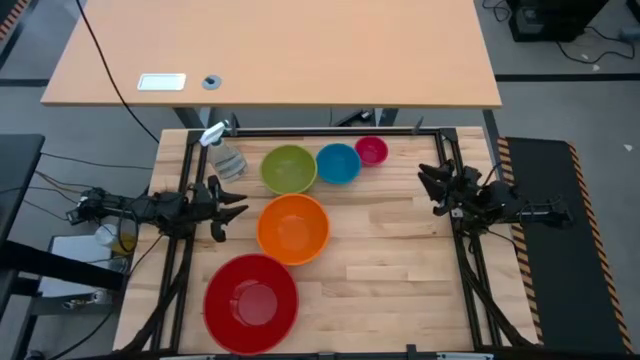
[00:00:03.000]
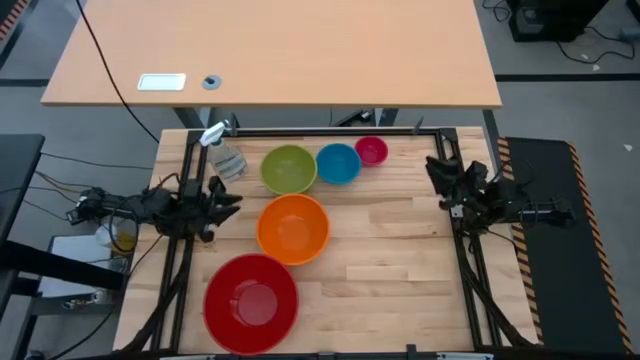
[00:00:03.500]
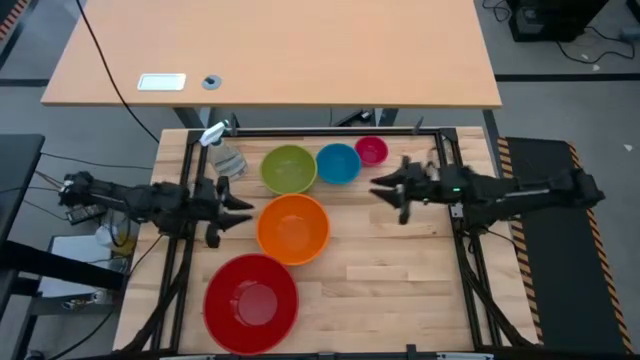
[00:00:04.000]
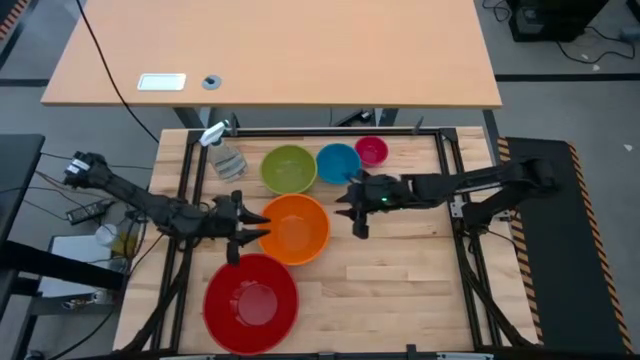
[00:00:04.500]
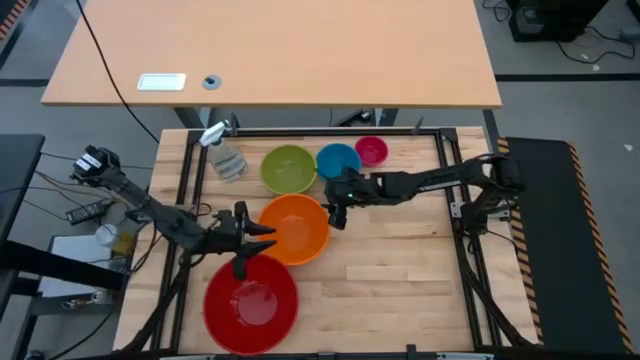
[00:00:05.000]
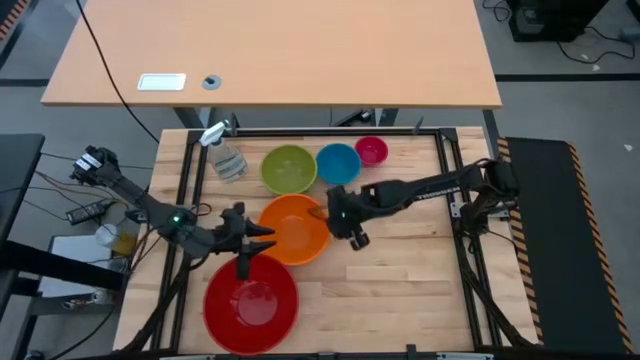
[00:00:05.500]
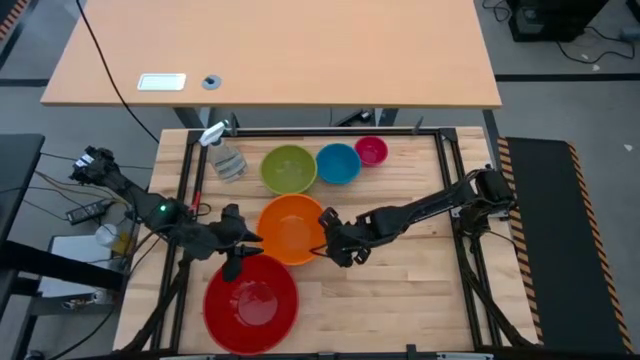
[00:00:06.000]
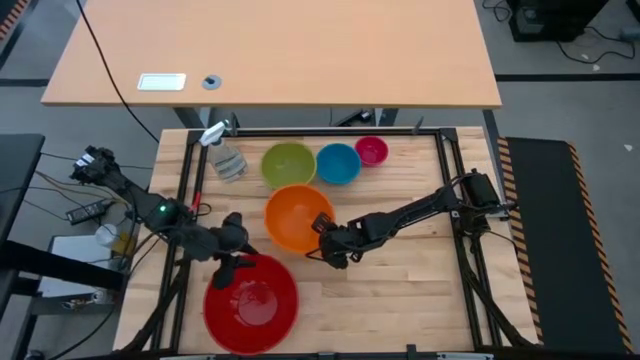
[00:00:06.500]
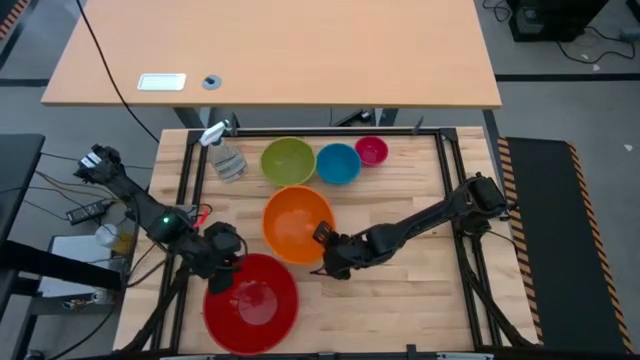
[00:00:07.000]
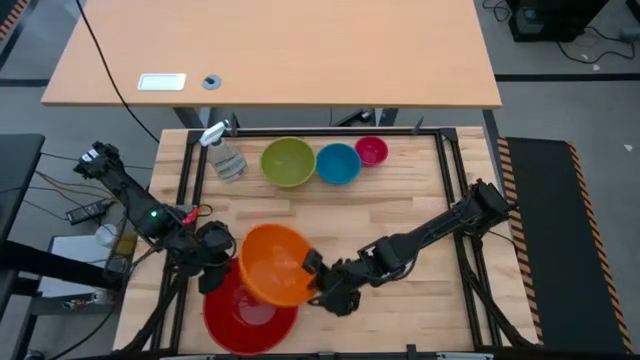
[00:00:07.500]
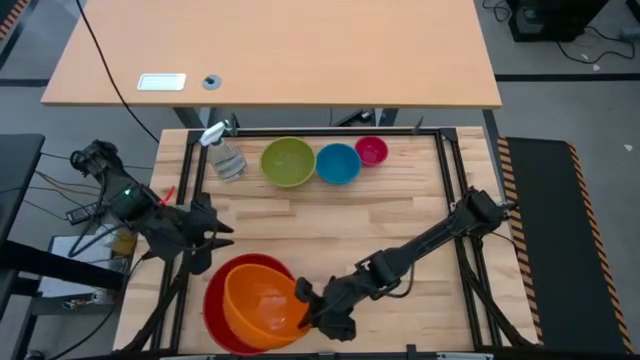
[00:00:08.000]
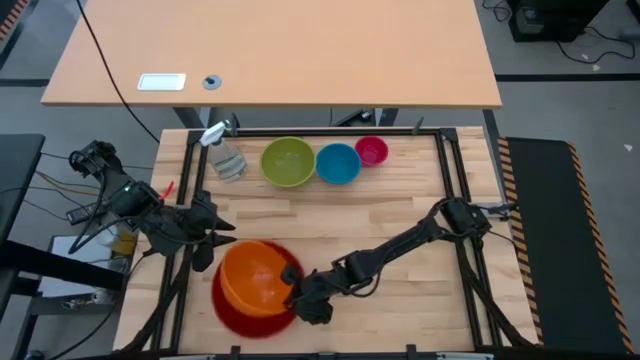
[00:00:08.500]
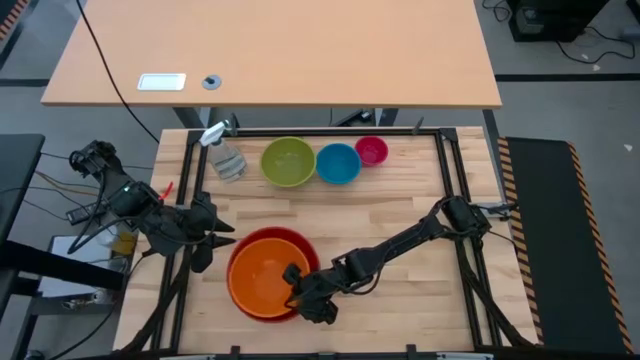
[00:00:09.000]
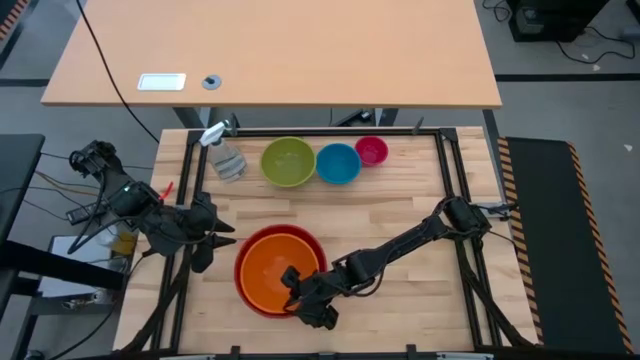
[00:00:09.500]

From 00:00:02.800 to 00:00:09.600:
Stack the orange bowl on top of the red bowl

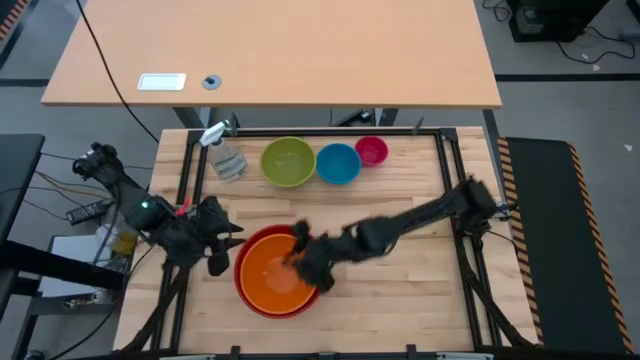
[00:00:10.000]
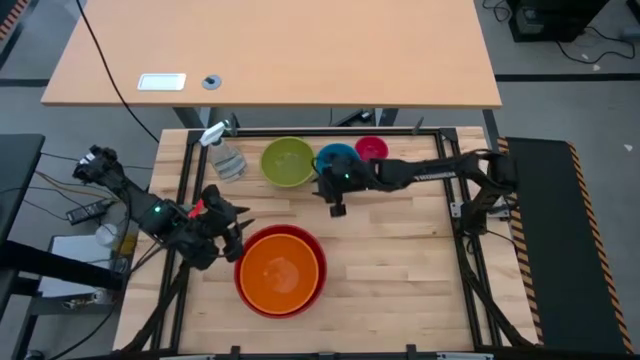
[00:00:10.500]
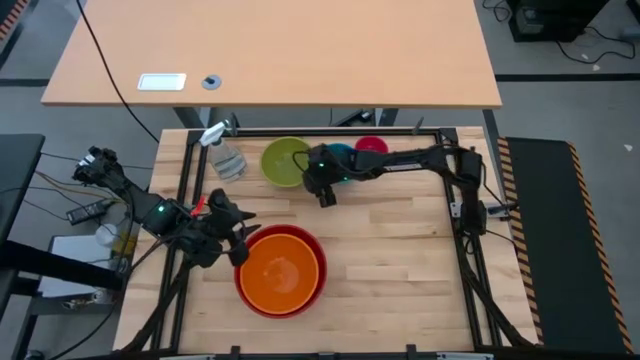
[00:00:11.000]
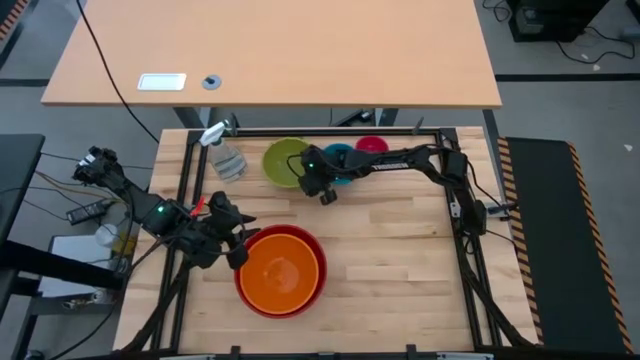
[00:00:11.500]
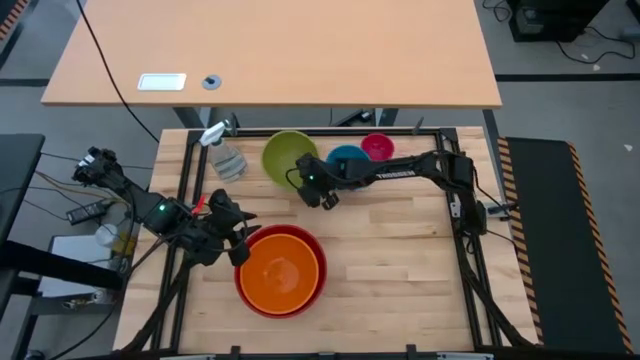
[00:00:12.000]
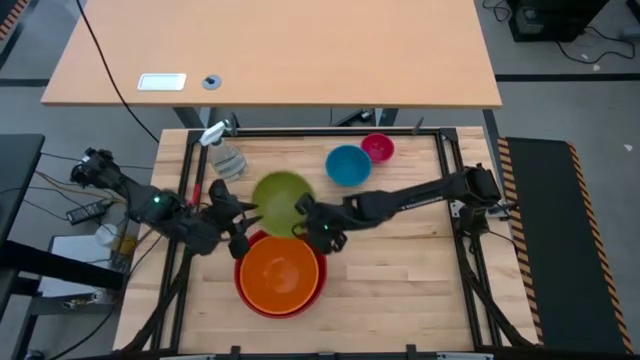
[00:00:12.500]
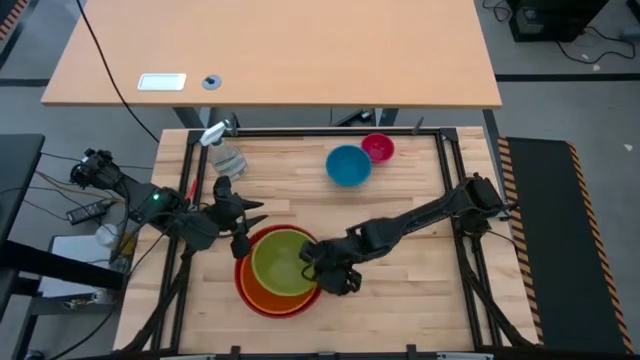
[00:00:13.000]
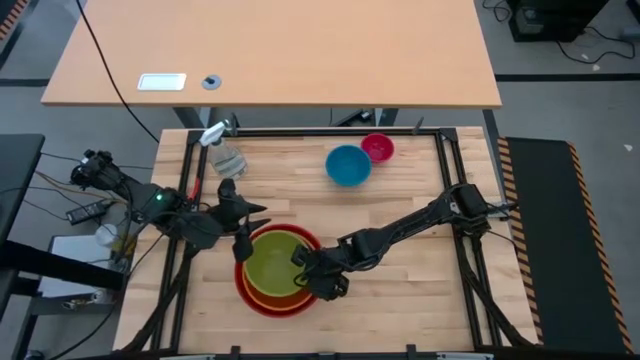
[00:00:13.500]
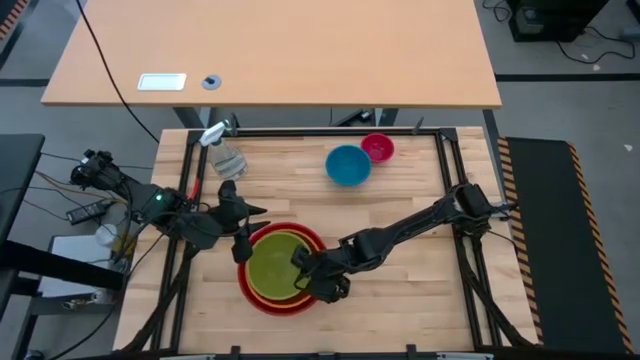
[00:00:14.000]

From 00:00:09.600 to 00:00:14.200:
Stack the green bowl on top of the orange bowl

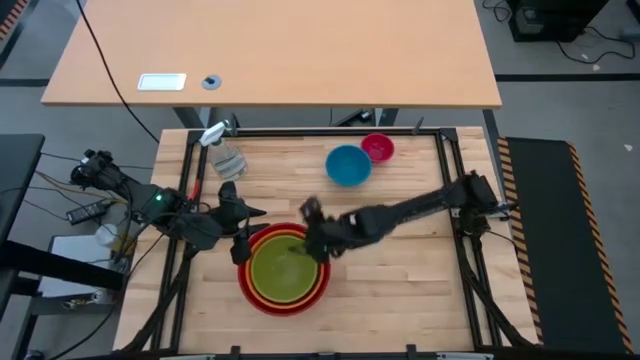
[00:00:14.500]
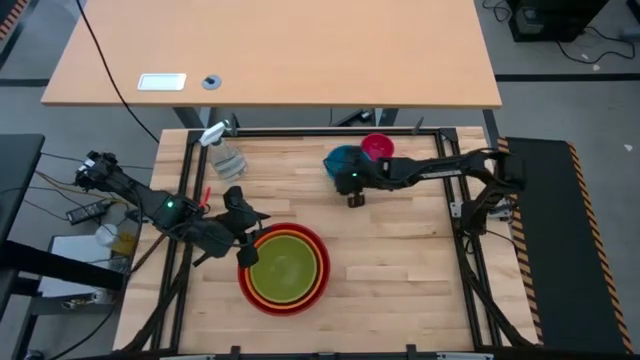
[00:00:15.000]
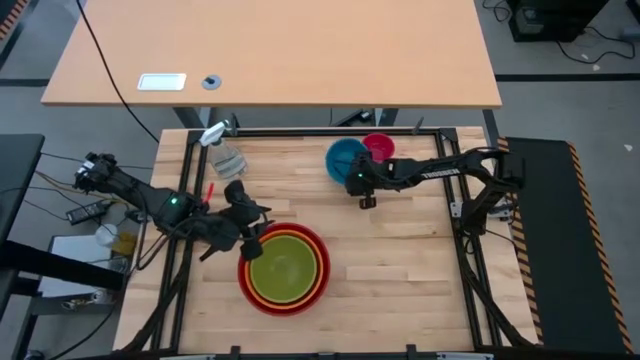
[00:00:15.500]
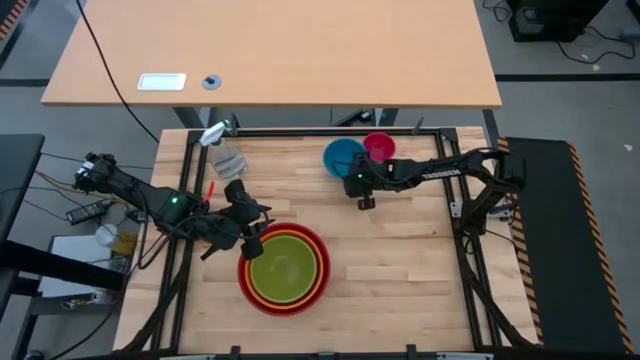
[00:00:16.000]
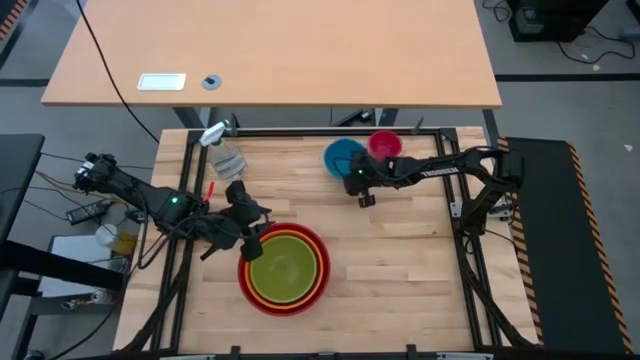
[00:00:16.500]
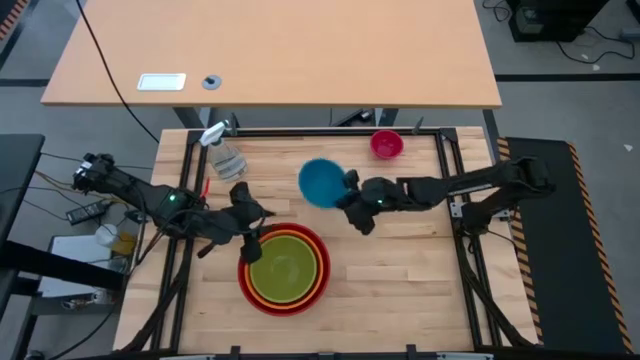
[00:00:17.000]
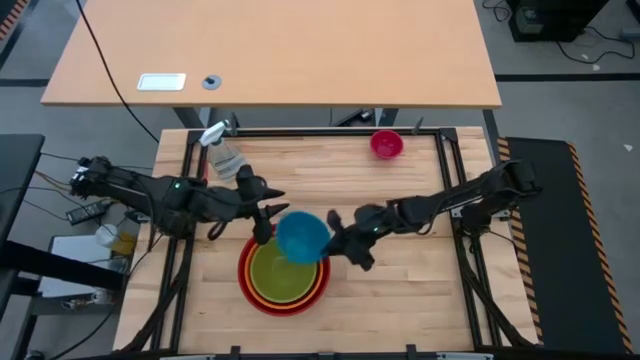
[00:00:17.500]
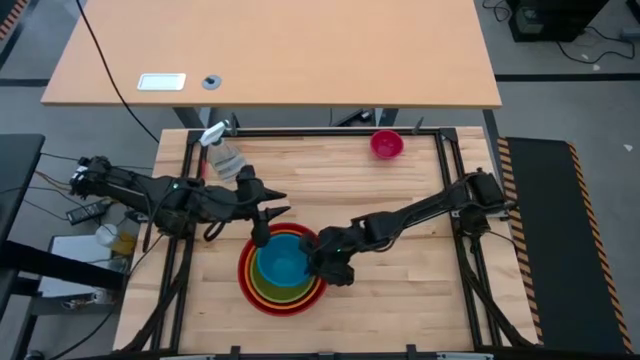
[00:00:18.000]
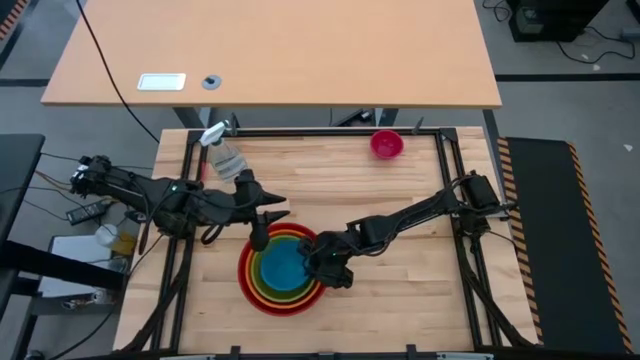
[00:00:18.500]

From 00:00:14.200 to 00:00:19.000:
Stack the blue bowl on top of the green bowl

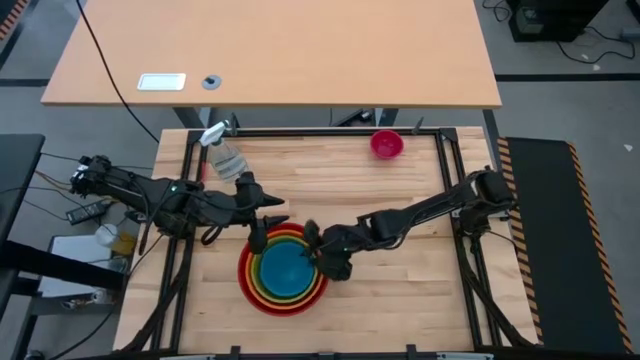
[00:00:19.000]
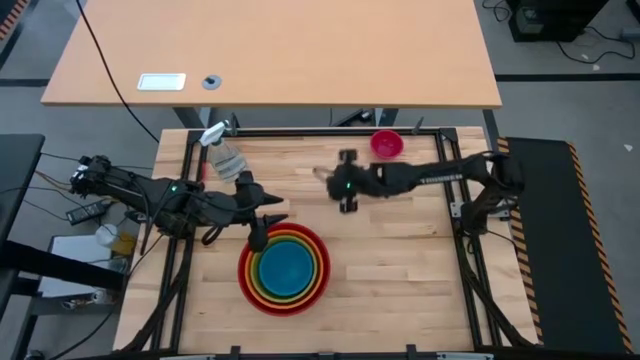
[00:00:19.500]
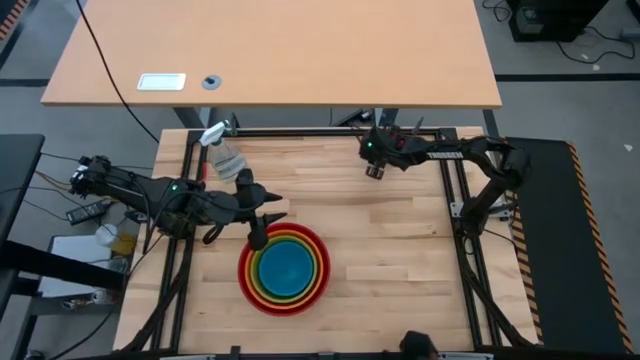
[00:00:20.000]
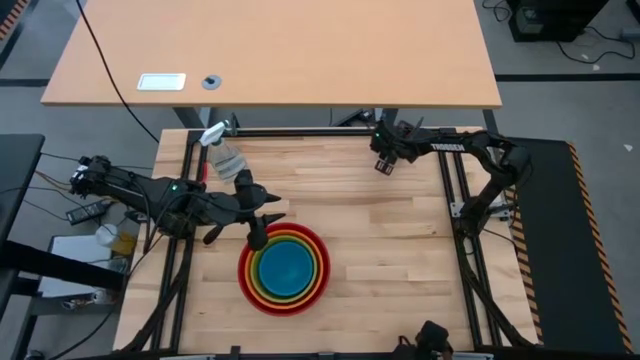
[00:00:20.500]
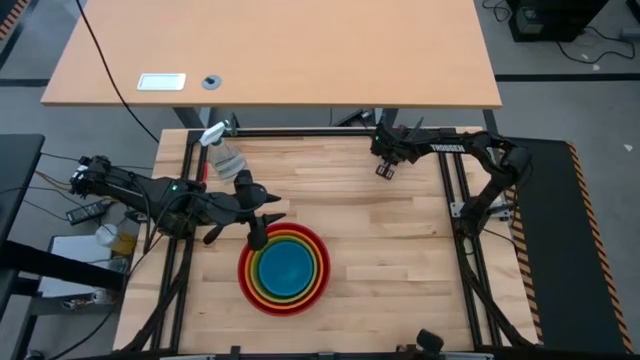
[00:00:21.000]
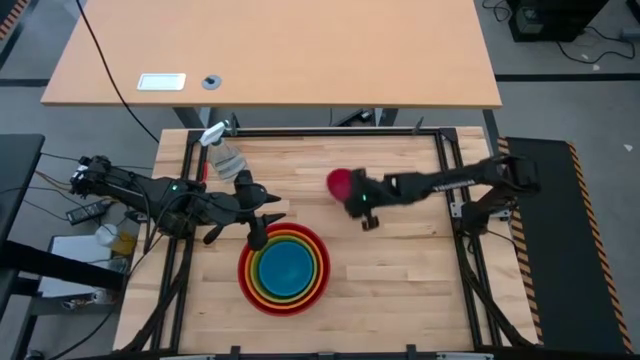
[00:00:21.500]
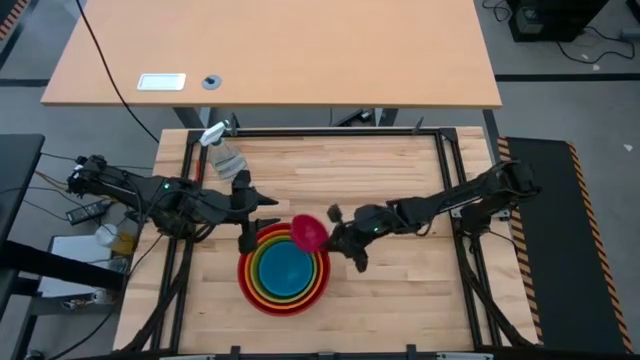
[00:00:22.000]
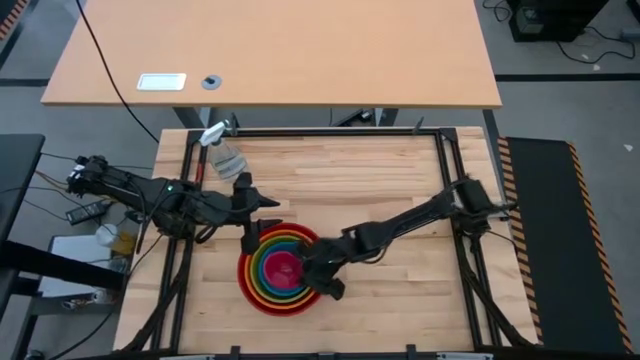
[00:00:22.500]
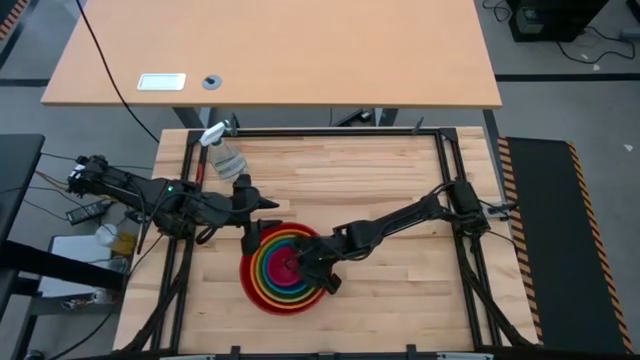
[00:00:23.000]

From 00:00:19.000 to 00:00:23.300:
Stack the pink bowl on top of the blue bowl
